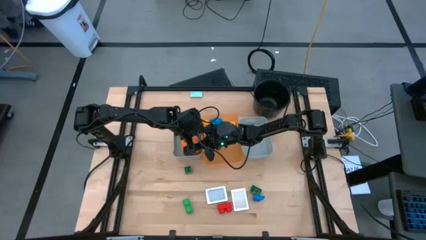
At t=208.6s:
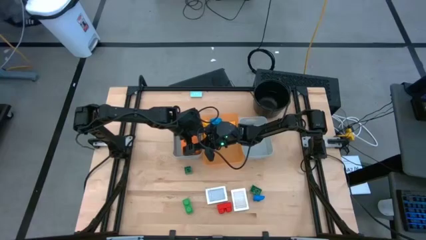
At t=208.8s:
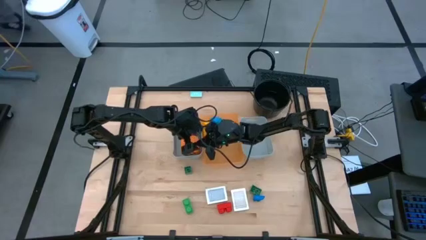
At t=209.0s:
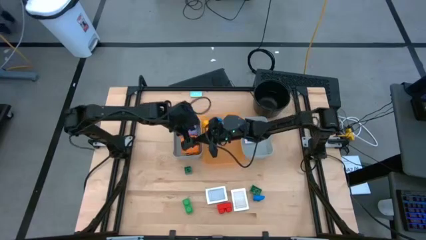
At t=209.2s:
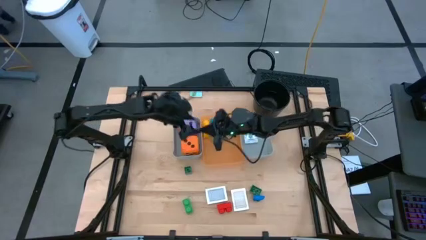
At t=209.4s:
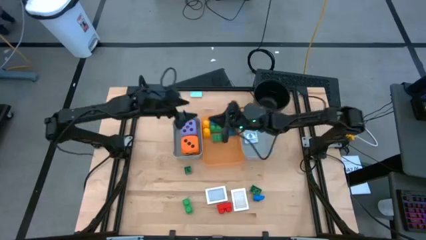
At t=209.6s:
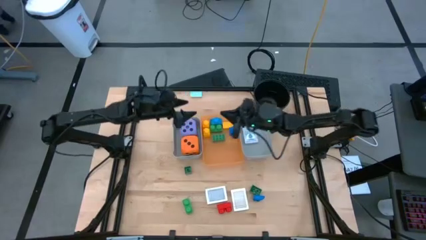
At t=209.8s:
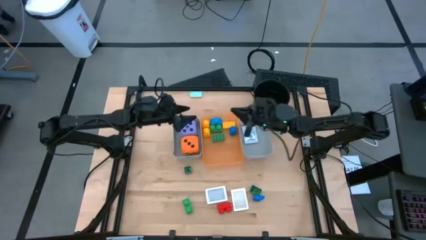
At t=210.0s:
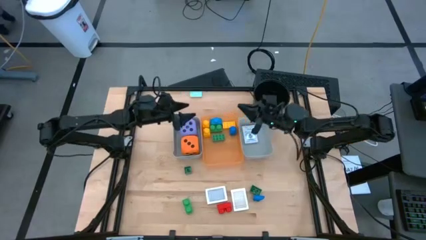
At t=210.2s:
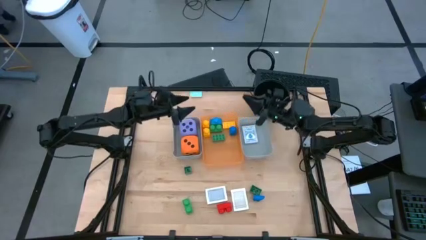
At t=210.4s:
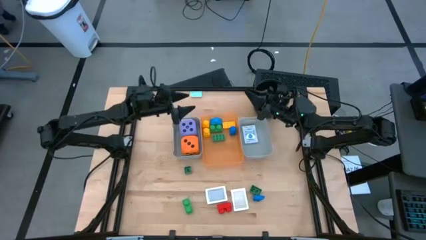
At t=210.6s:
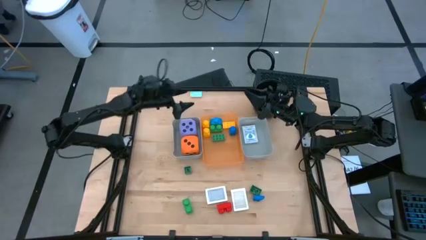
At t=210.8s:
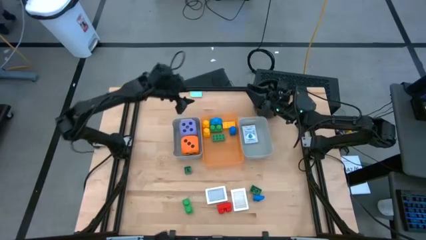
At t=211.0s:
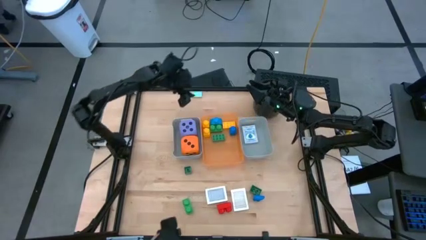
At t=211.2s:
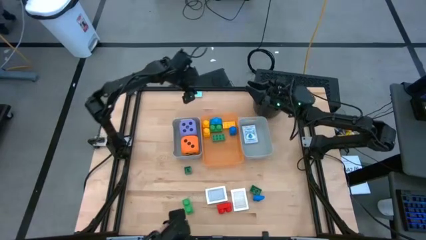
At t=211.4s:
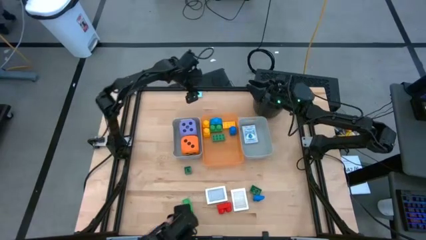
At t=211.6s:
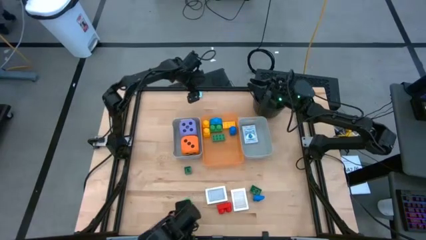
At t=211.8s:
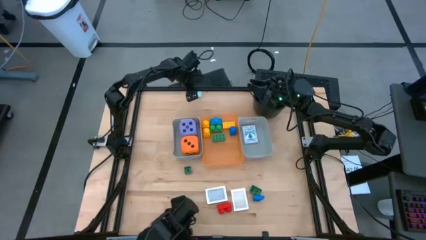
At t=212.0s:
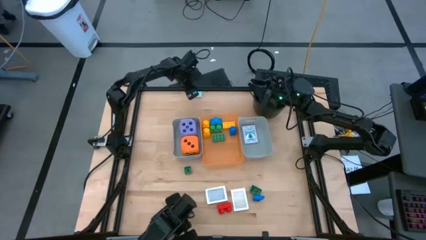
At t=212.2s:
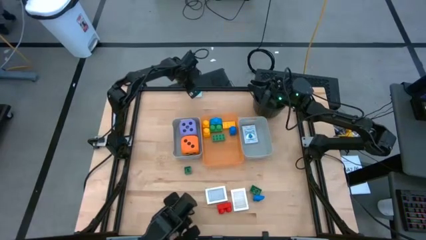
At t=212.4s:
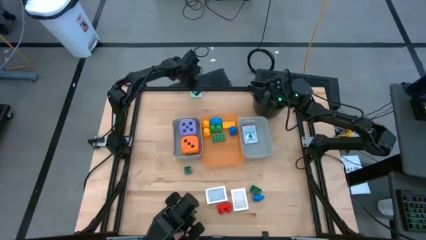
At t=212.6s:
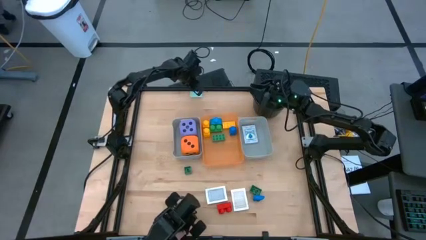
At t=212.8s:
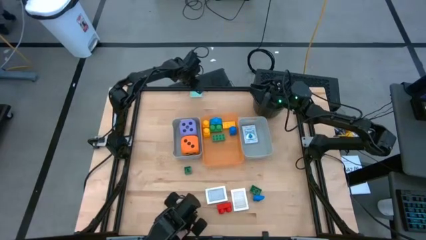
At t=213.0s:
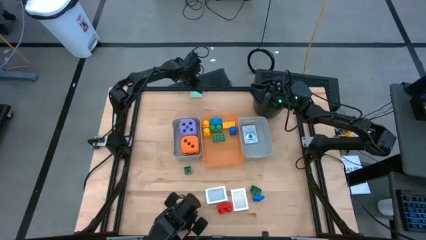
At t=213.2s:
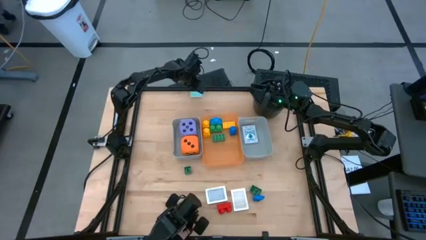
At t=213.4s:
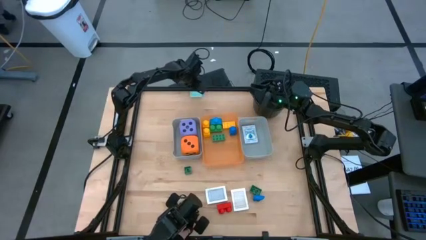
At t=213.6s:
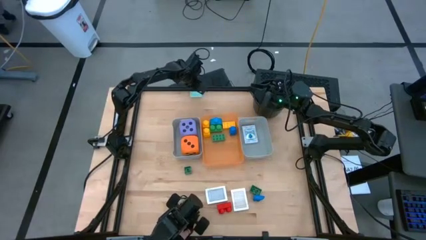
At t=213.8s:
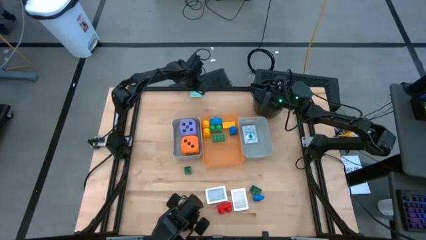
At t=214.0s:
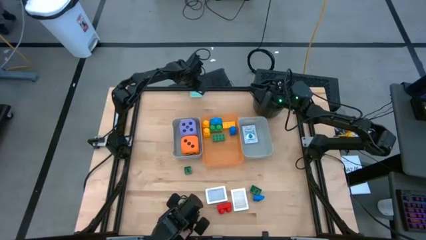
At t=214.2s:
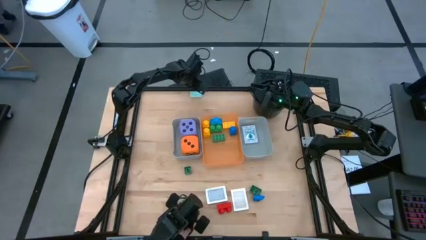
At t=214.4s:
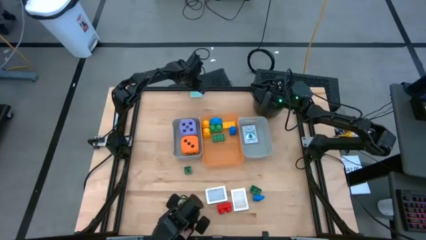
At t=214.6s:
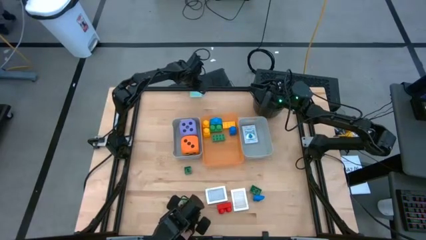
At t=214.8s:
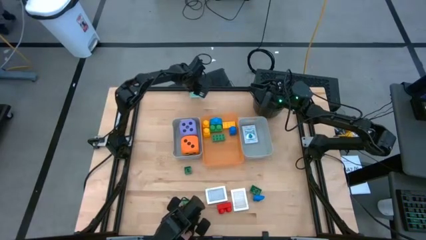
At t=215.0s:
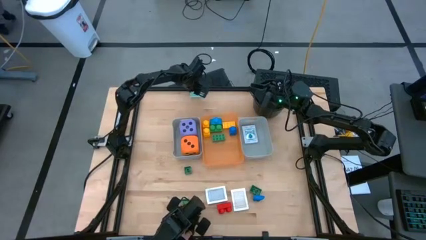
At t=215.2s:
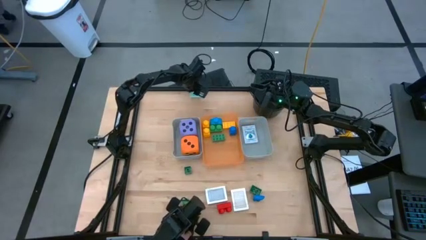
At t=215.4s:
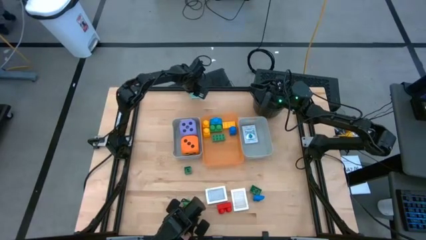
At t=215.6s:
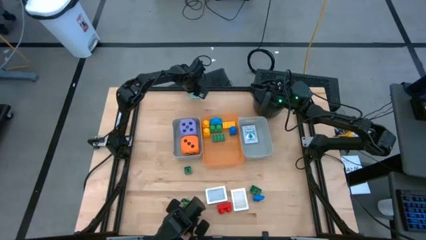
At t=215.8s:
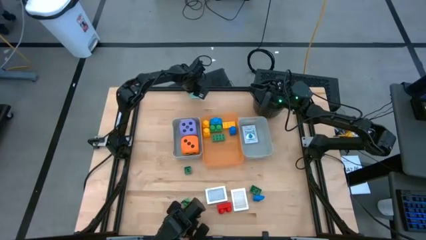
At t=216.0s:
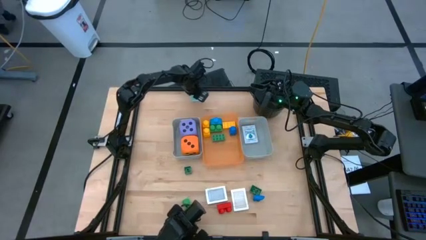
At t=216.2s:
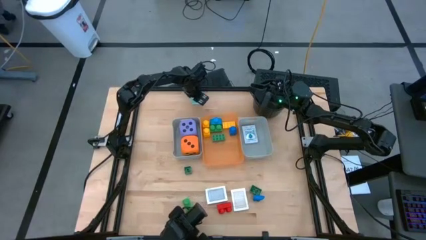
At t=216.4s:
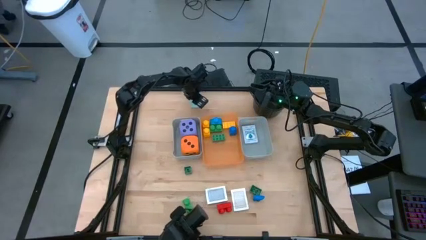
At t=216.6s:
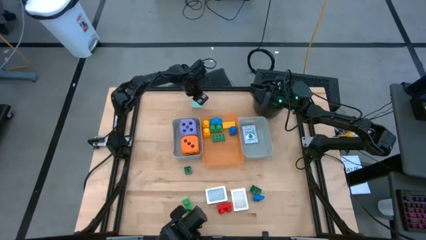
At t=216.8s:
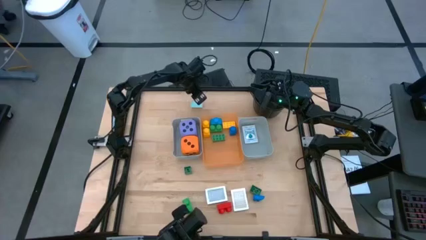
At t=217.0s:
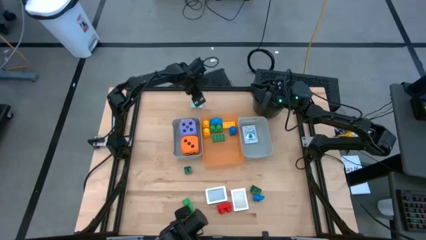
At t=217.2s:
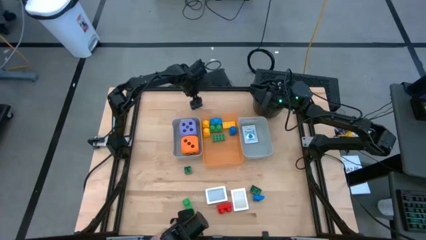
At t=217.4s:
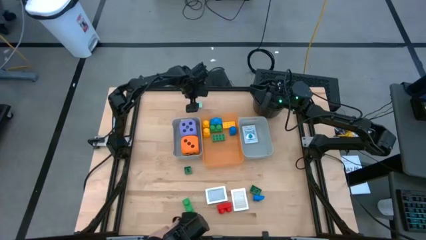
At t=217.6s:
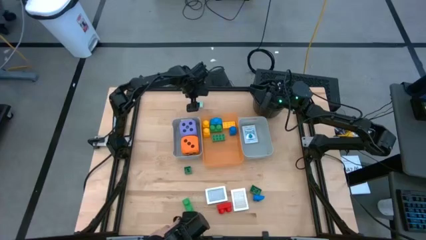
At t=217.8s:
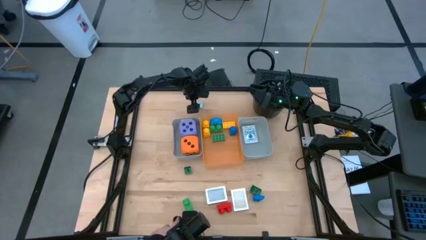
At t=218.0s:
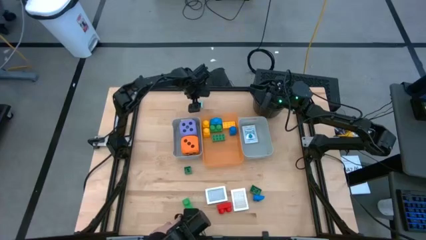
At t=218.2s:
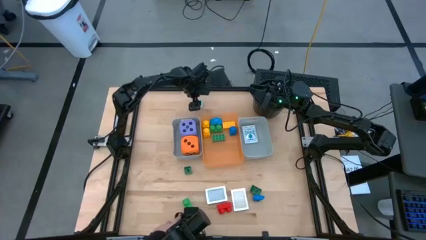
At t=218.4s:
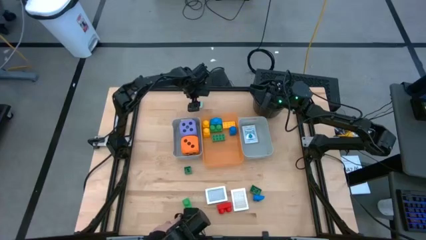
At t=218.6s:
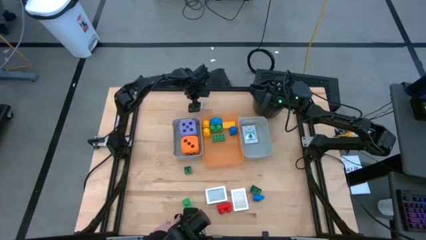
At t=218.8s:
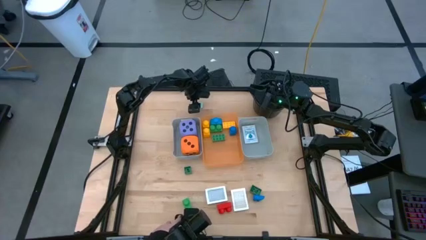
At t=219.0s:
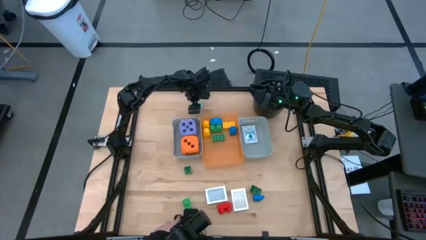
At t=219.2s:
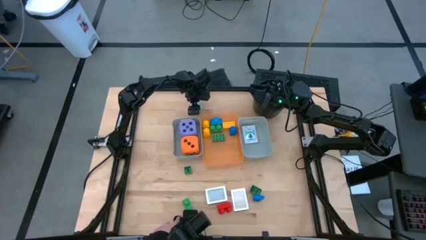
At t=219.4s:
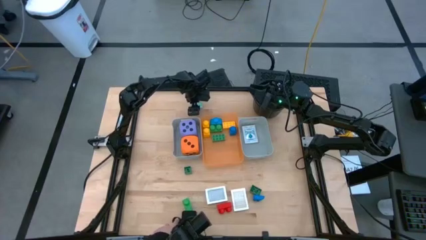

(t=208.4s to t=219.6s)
Task: Pick & Place Toys
Put the light blue game piece into the orange bin

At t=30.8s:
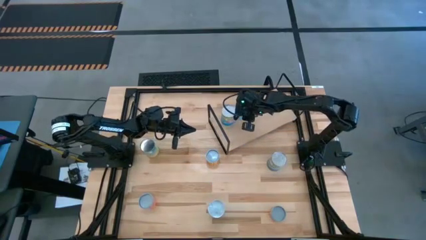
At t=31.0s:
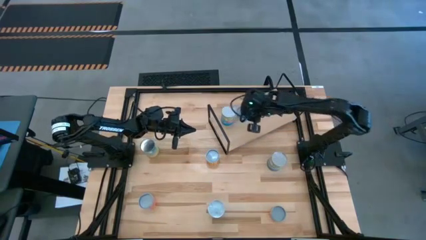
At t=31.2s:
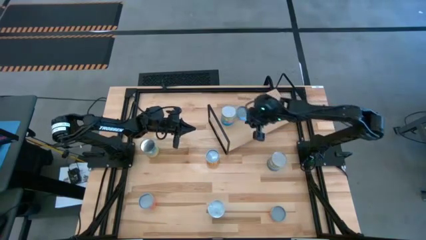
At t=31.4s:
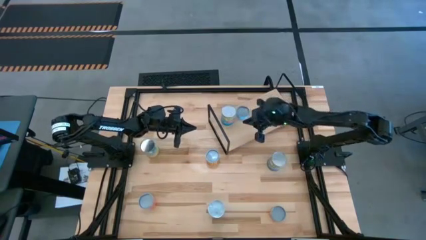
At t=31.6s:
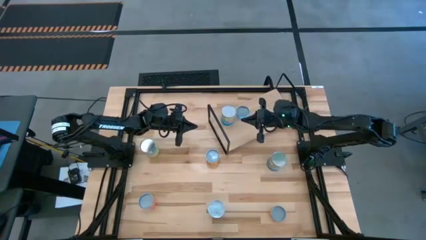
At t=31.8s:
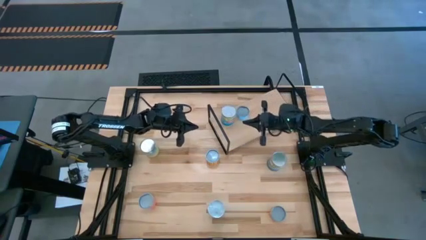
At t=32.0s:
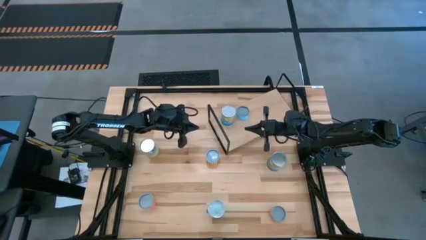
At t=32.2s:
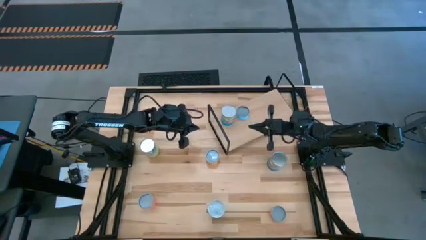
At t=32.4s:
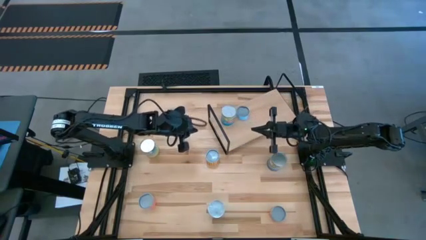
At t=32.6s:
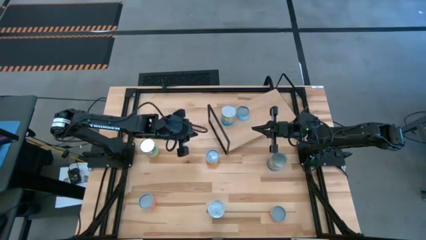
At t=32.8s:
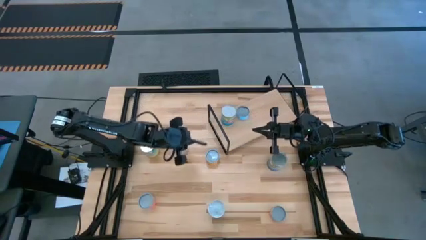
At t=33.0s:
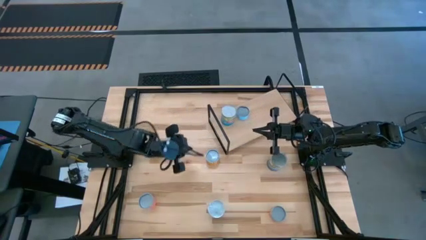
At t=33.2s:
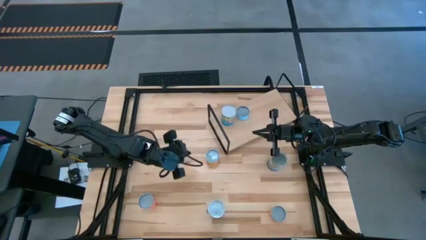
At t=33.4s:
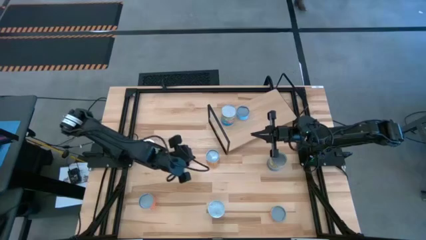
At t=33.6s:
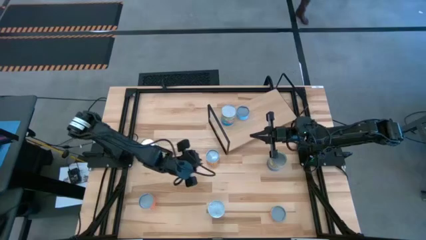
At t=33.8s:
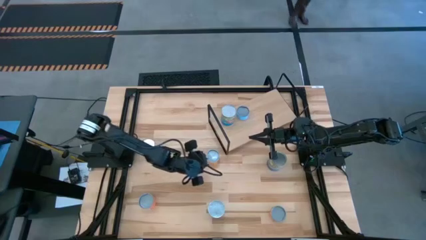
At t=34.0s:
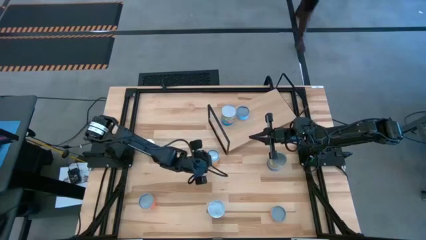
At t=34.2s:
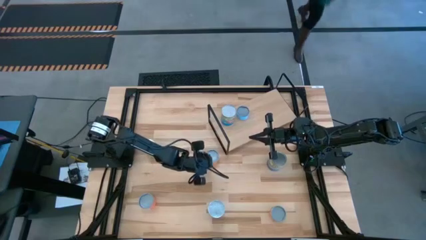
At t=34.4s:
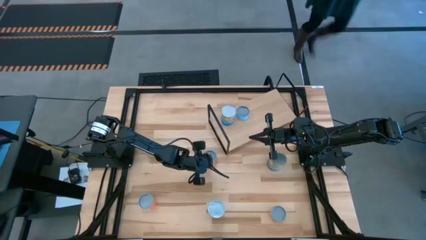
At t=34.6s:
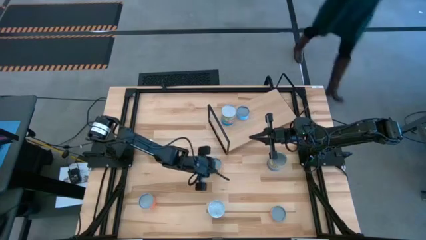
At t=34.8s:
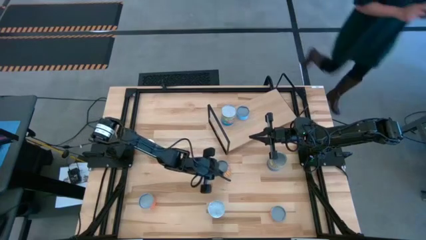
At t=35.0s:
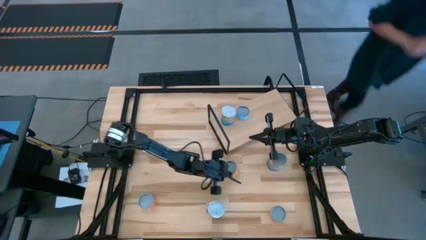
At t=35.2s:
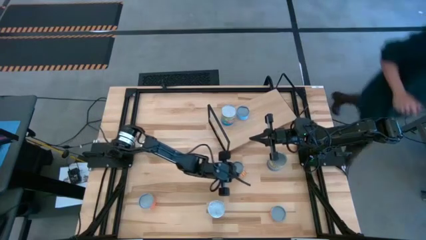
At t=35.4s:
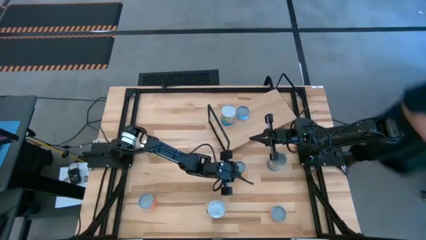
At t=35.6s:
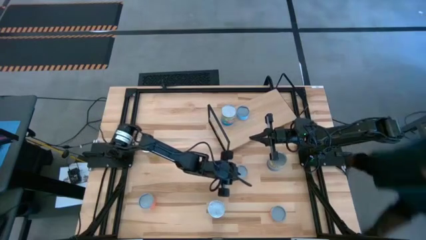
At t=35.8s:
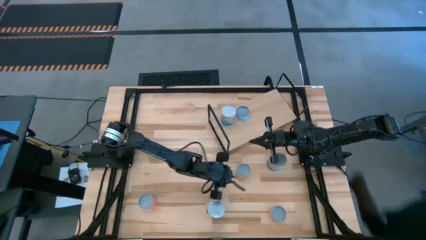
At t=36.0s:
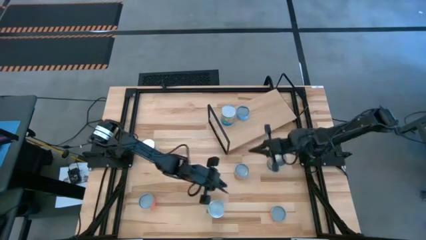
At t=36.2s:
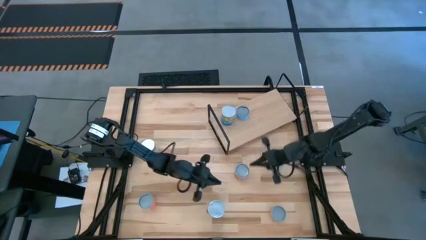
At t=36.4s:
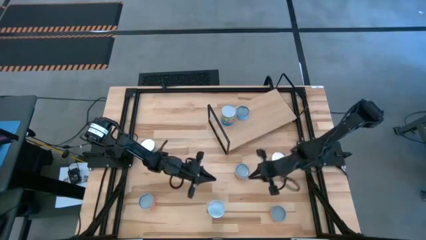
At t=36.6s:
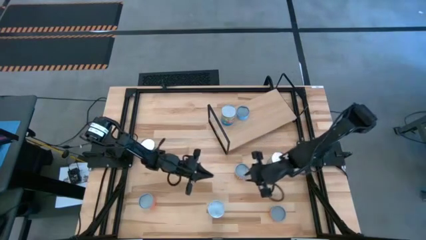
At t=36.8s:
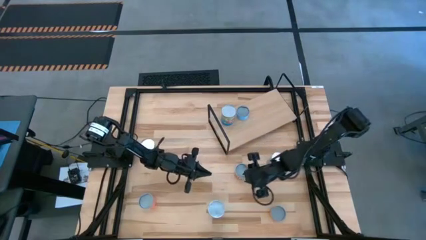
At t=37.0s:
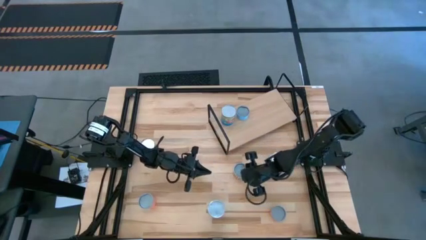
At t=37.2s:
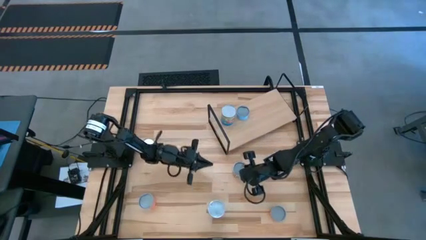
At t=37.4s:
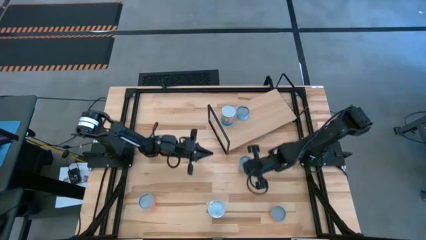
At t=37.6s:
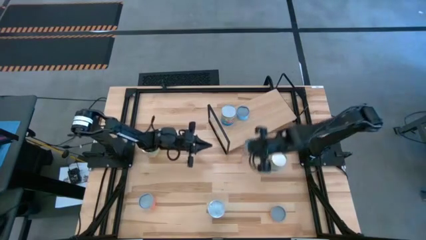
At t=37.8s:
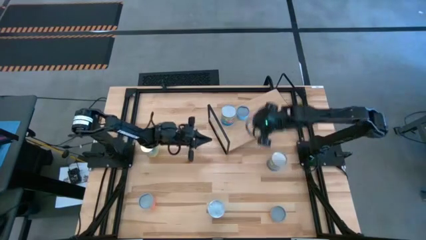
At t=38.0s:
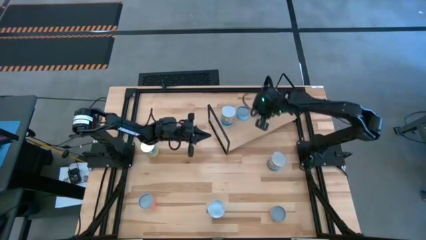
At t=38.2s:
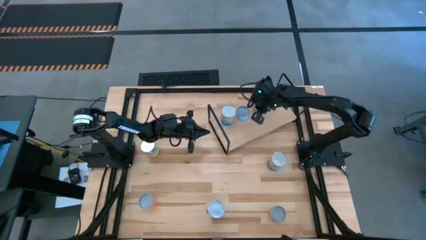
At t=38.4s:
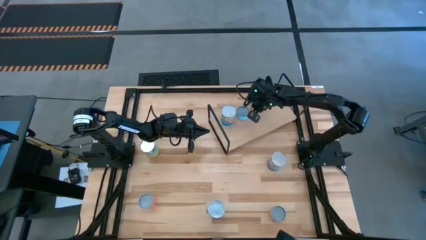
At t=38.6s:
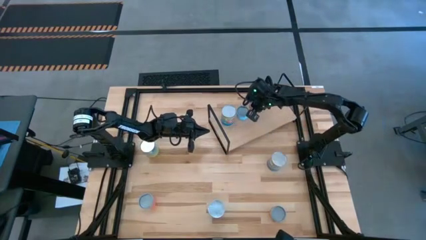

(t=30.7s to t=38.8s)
Task: Pick and place cans onto a shelf
Put the canned spicy black beans onto the shelf
